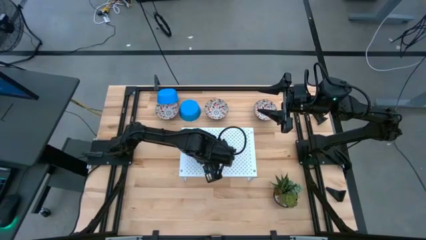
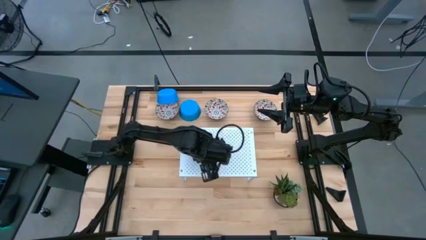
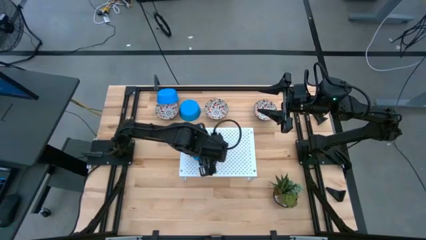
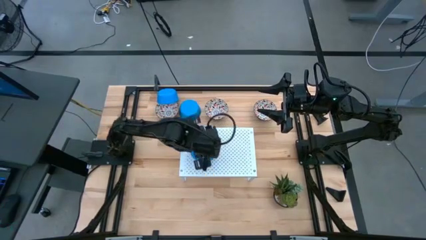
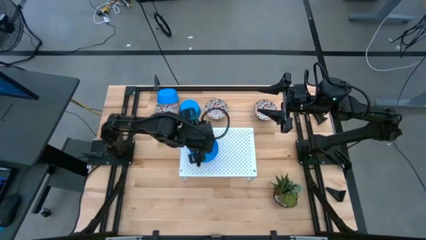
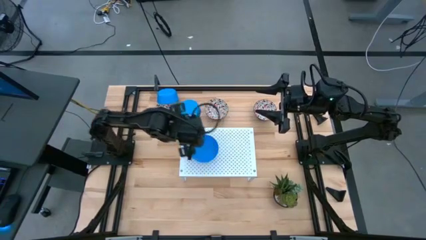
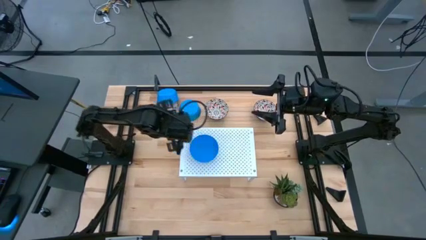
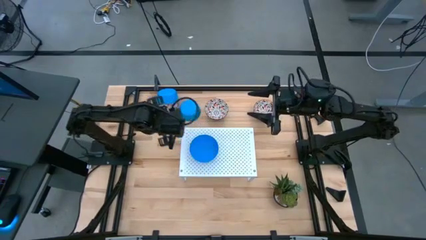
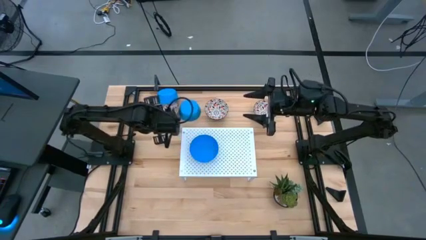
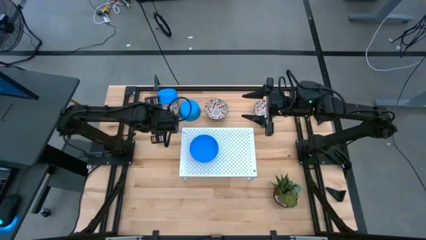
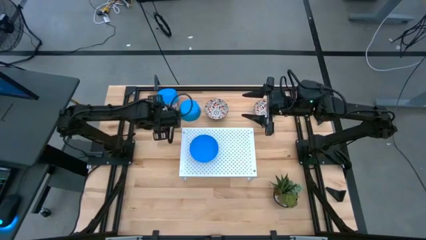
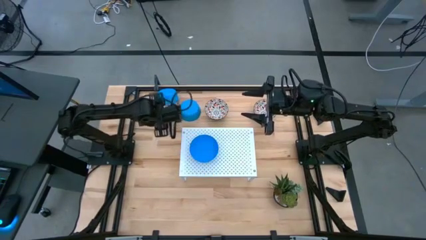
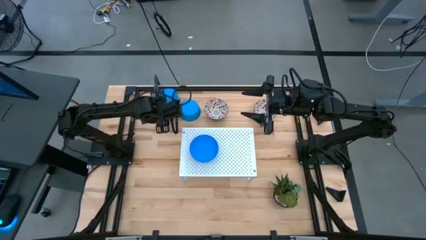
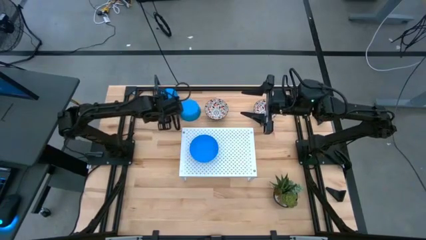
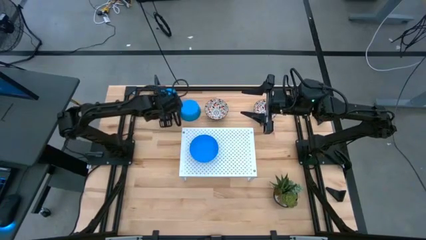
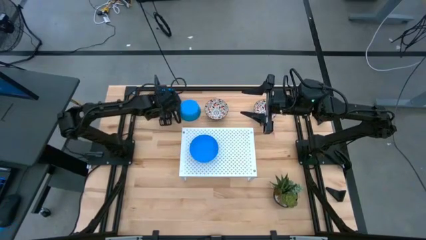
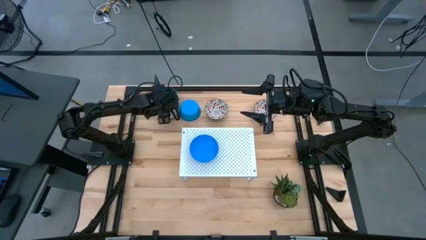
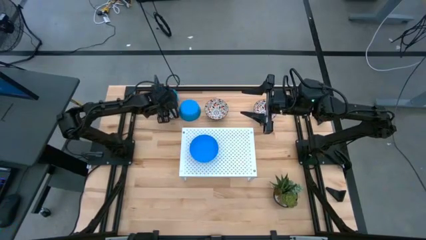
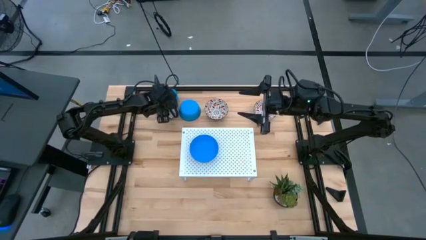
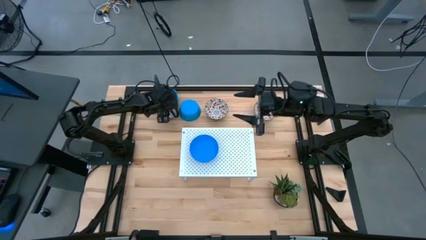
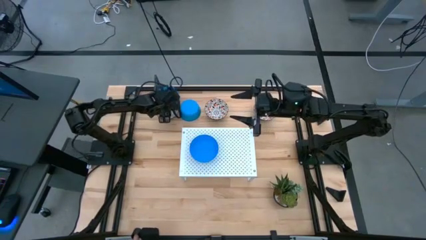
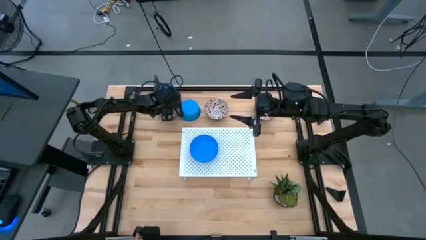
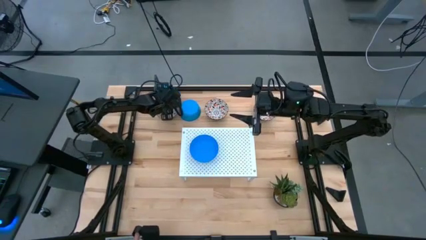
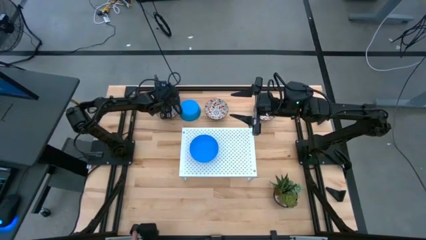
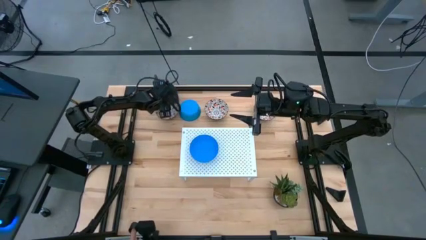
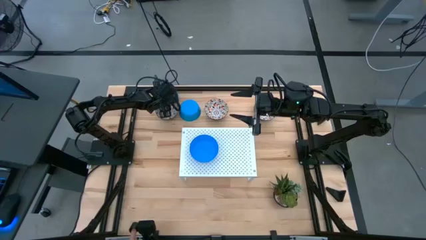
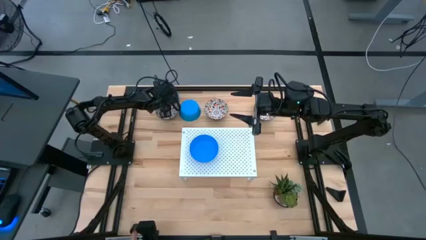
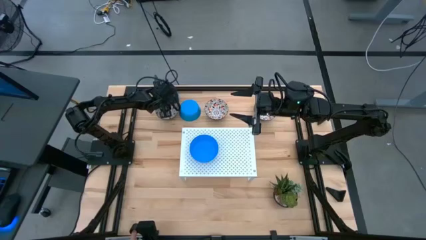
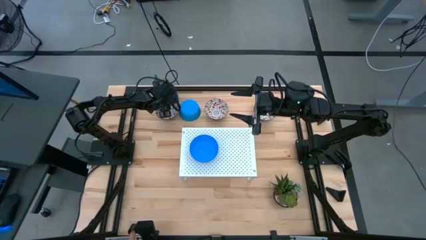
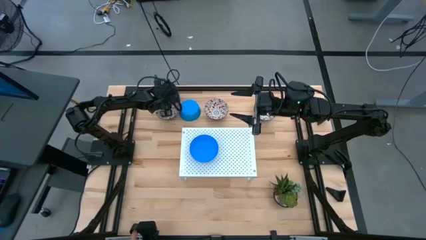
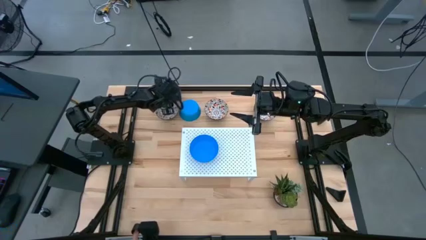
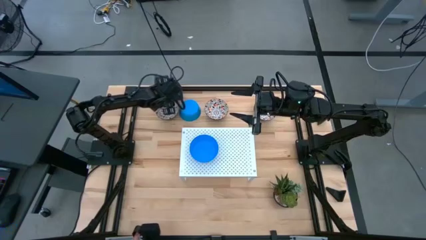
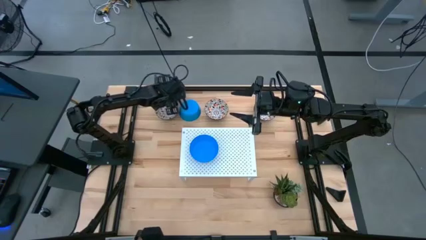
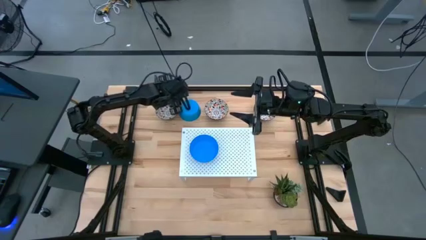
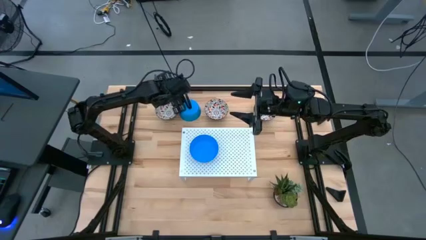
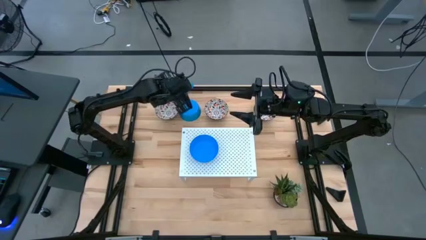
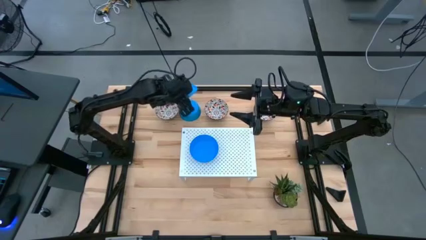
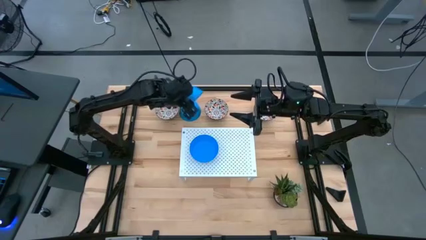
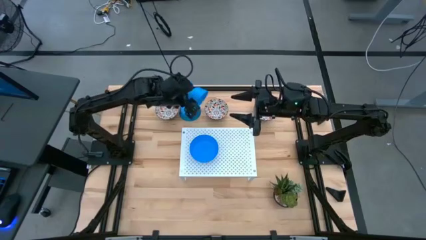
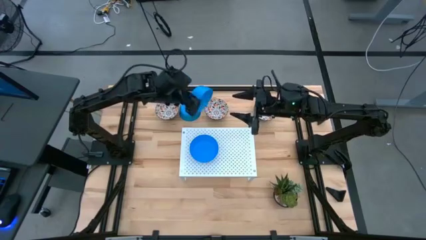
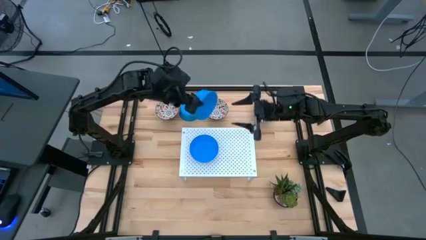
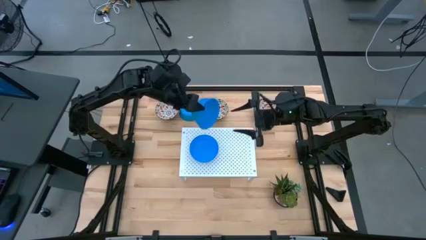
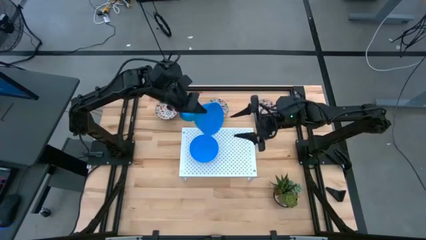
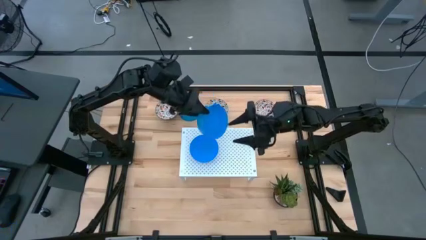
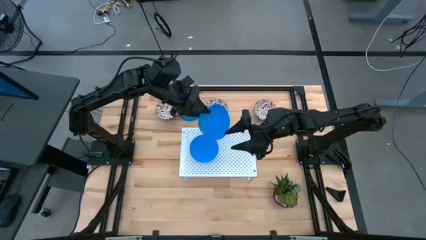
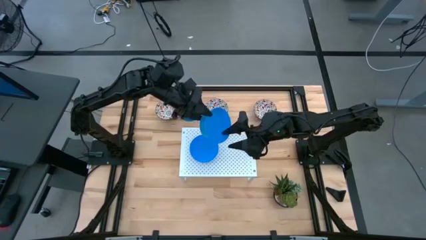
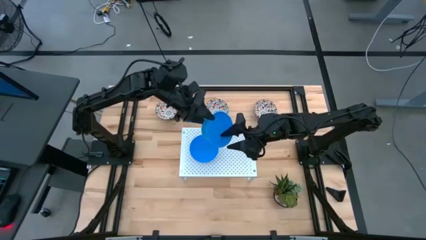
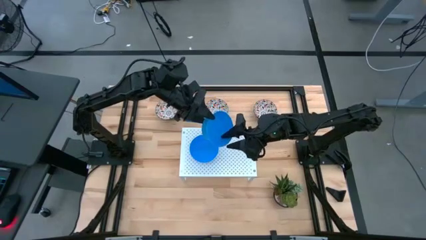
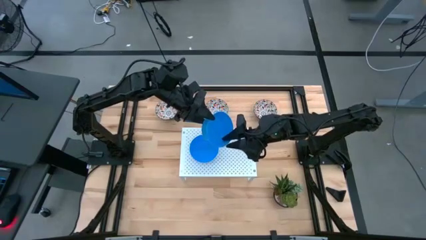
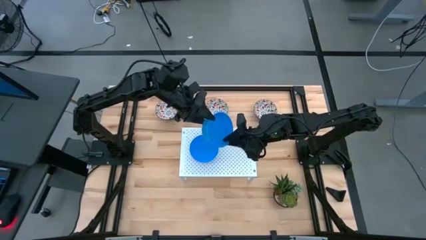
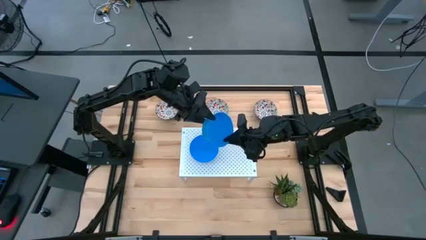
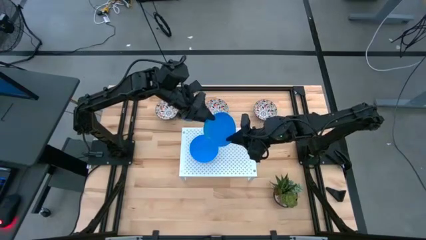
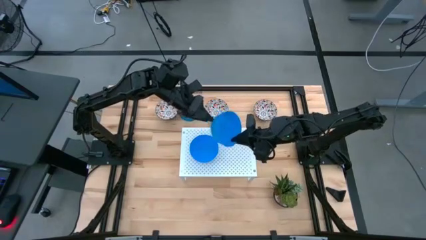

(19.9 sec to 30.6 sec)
Task: Pick & Place Mini bowls
Stack the left blue bowl on top of the blue bowl on the shelf
